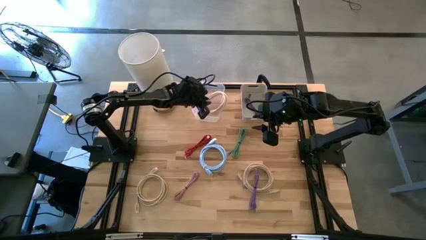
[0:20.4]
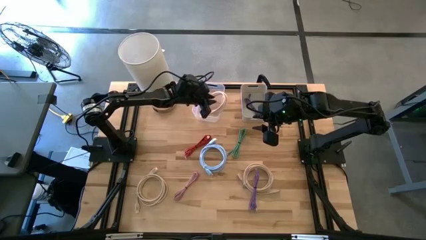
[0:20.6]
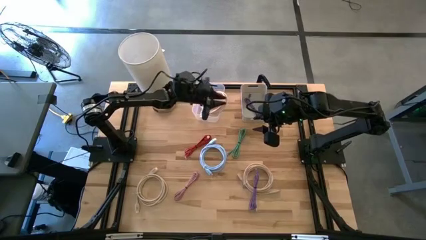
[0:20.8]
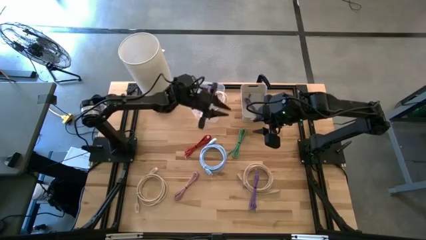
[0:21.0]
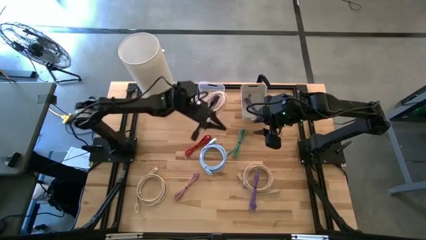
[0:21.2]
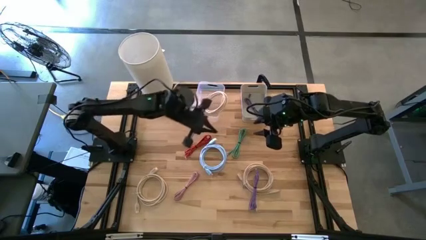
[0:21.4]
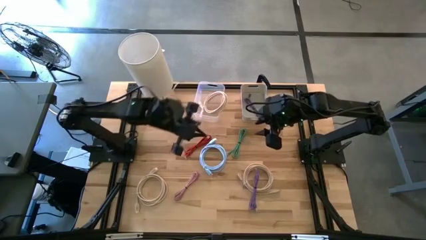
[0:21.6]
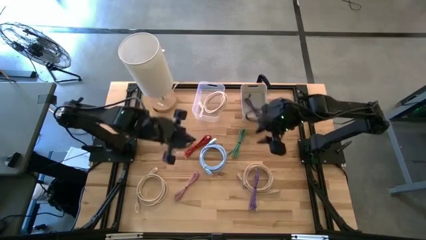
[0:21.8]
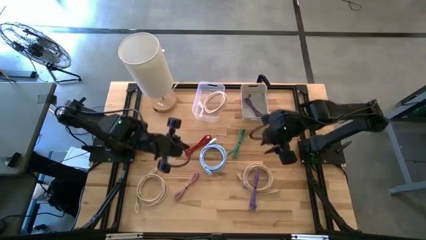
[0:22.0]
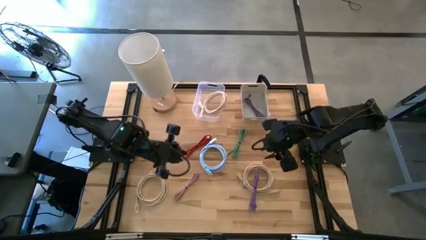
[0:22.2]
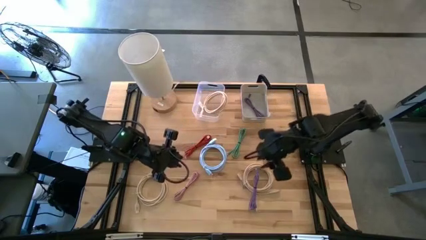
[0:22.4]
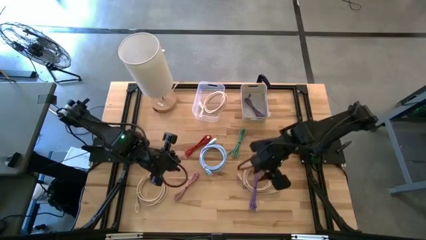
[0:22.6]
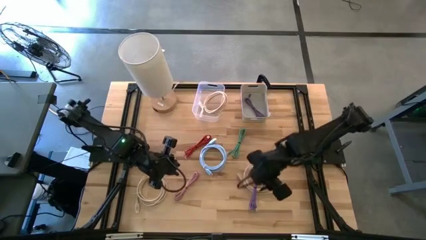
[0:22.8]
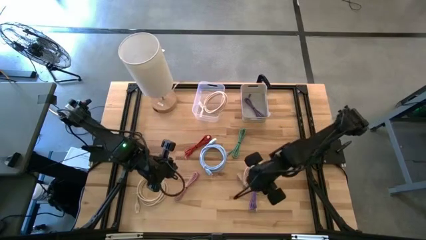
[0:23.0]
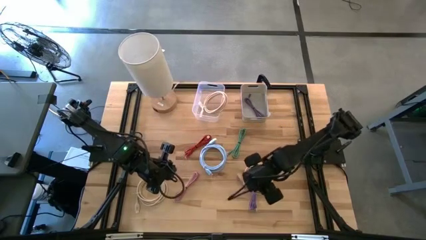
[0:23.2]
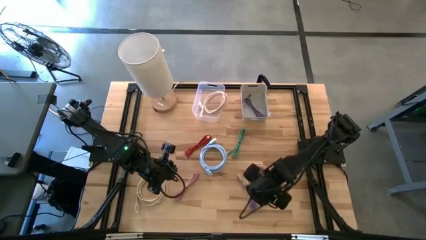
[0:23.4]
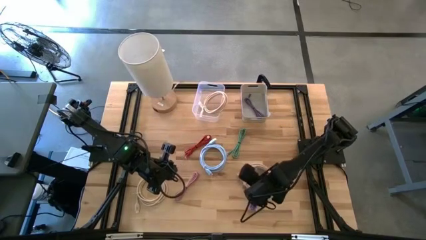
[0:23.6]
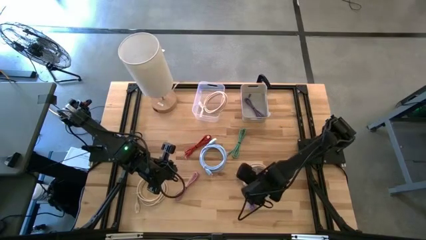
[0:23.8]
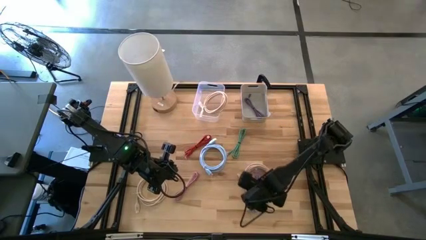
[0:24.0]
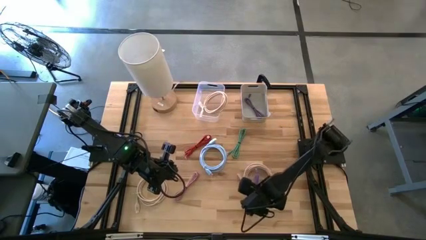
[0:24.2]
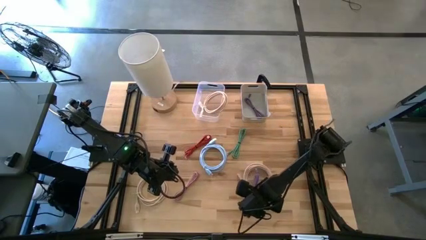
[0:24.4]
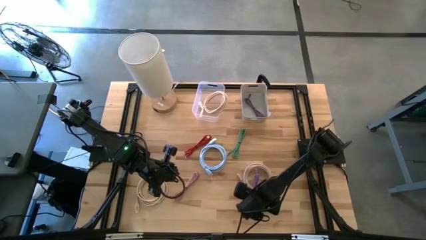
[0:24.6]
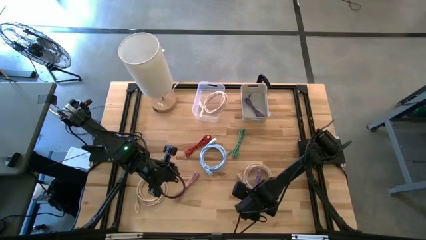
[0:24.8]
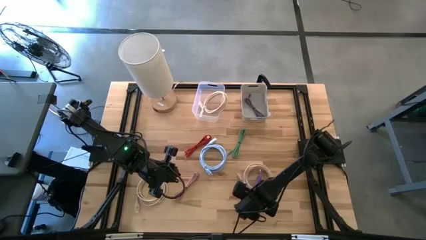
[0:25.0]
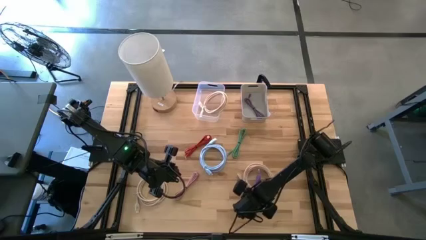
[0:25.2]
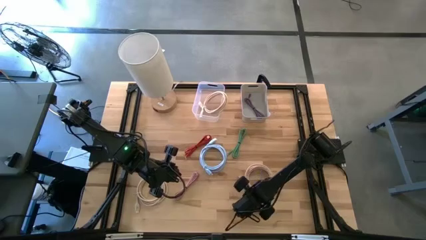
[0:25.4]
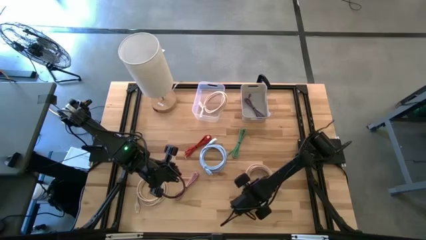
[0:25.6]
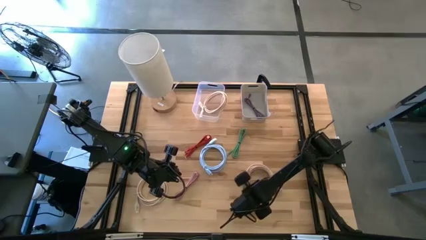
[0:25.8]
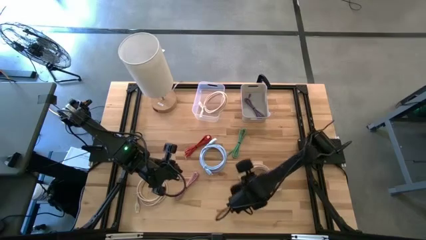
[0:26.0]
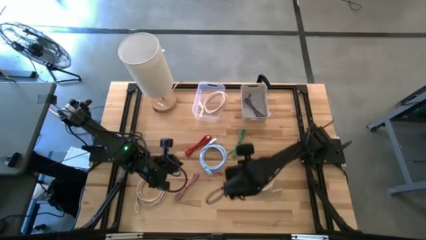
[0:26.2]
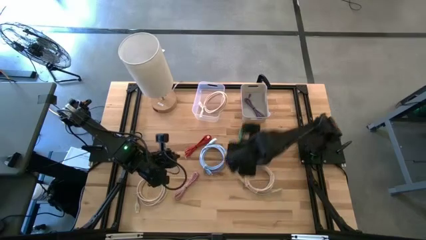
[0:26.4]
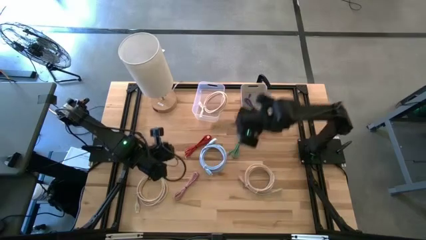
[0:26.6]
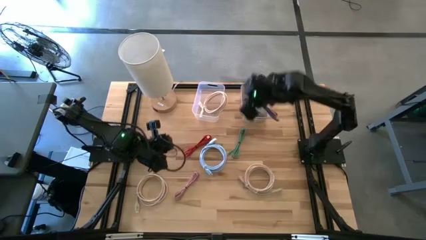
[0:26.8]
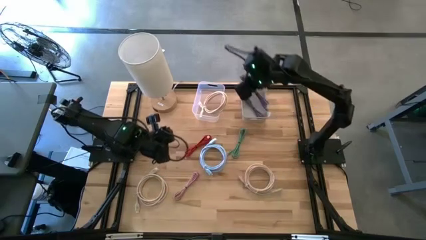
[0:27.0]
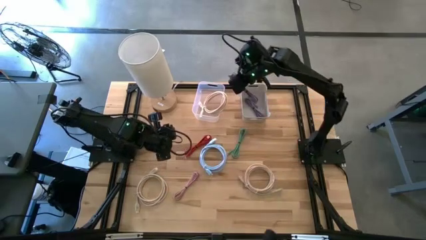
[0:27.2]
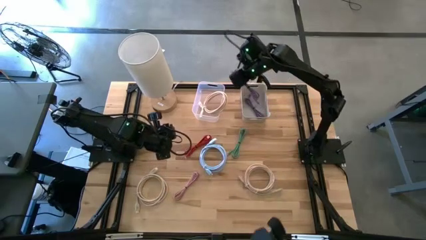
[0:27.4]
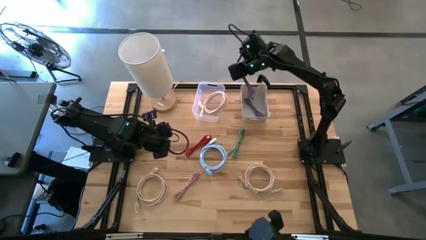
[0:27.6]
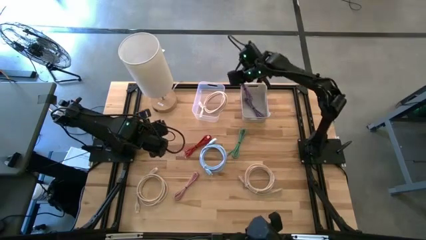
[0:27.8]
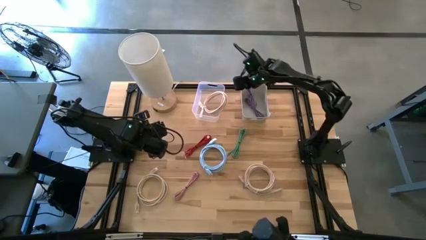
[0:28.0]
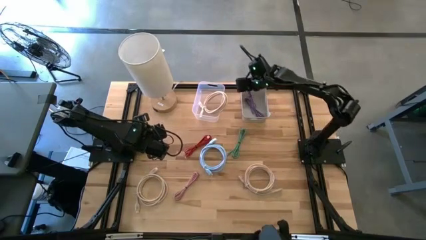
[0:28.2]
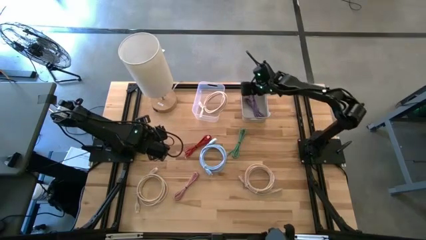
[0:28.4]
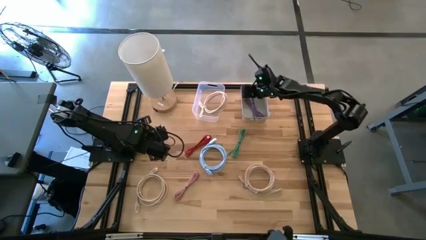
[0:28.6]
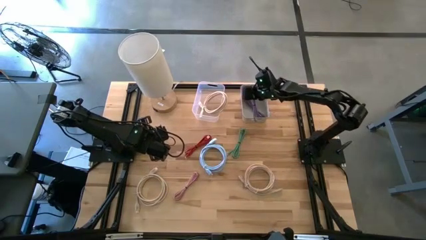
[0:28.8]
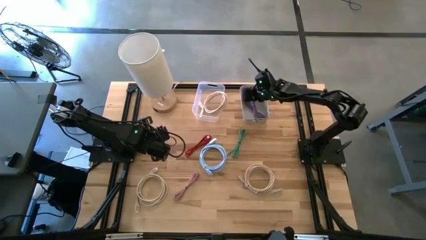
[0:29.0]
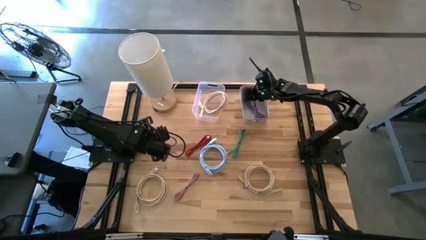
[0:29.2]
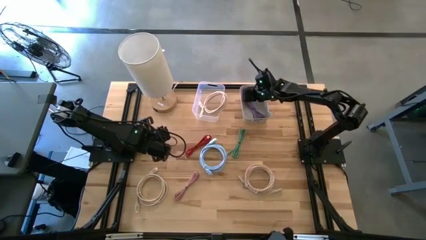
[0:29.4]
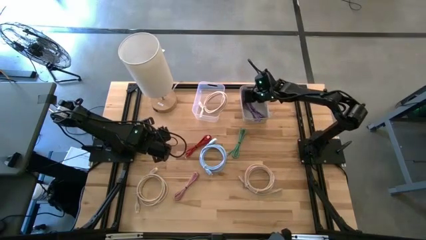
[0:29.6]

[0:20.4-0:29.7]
Task: Pick & Place USB Port
Put the purple charger cable into the gray bin

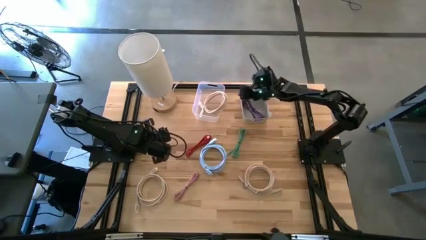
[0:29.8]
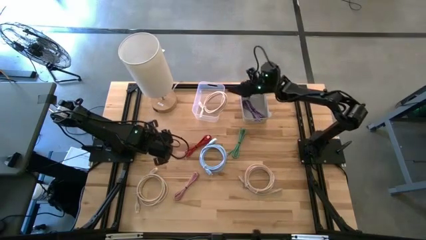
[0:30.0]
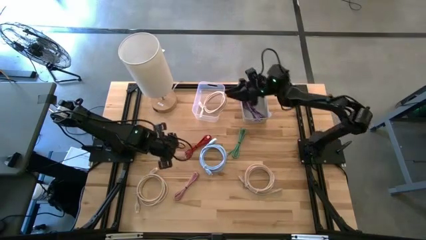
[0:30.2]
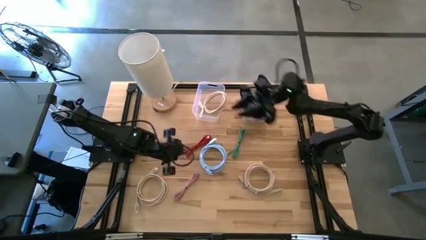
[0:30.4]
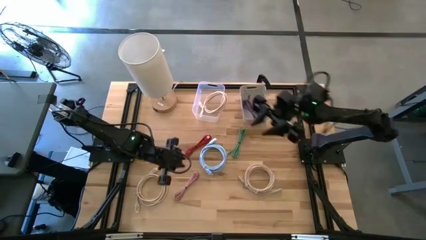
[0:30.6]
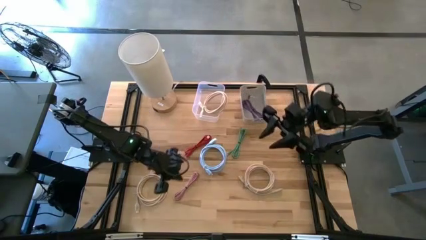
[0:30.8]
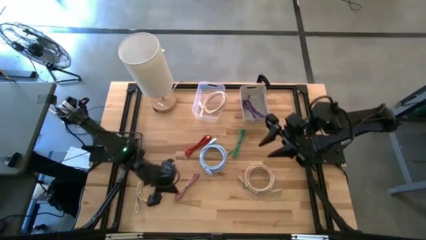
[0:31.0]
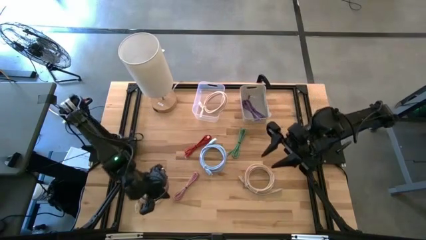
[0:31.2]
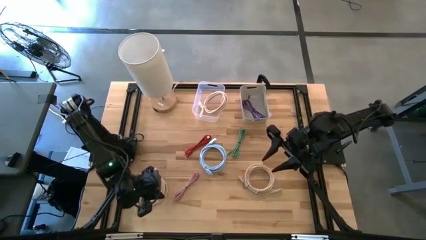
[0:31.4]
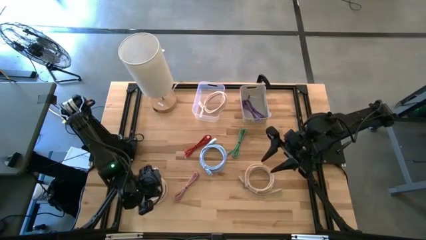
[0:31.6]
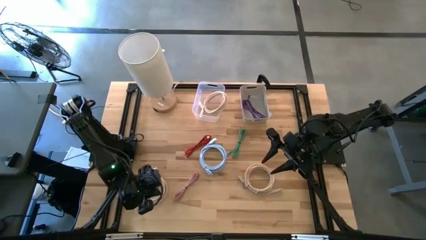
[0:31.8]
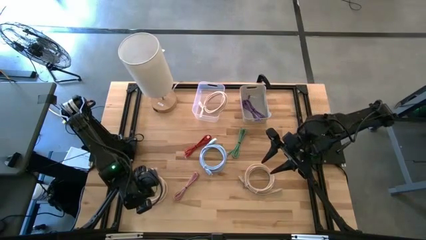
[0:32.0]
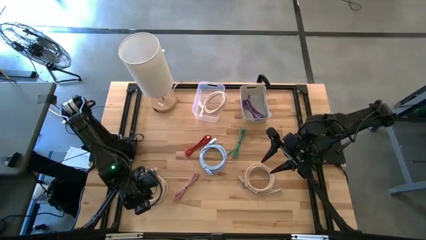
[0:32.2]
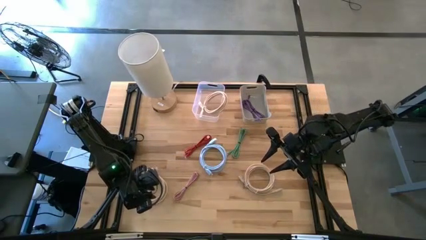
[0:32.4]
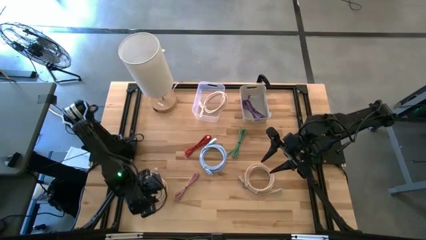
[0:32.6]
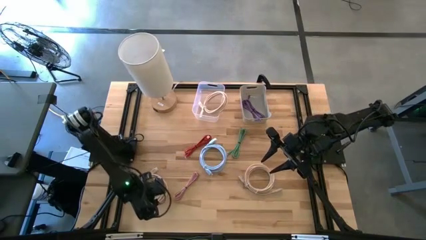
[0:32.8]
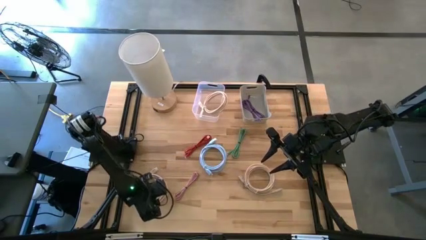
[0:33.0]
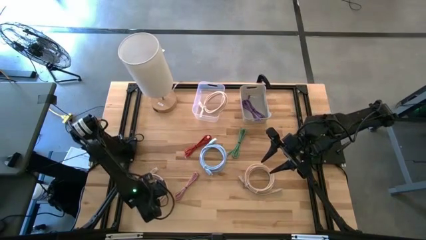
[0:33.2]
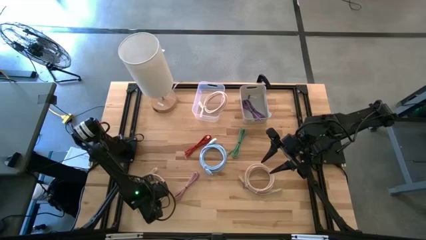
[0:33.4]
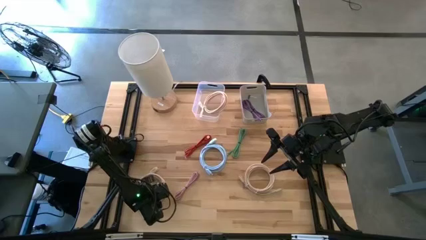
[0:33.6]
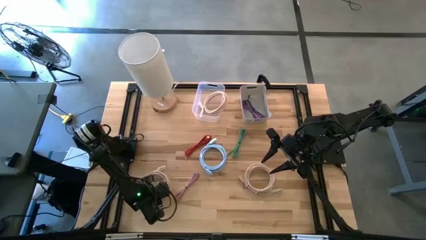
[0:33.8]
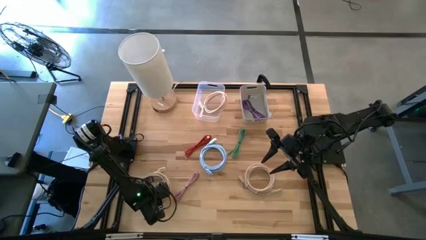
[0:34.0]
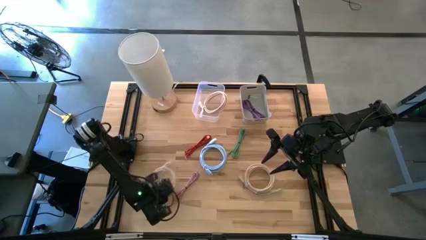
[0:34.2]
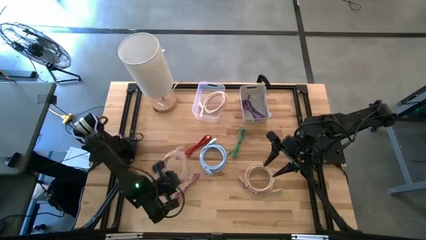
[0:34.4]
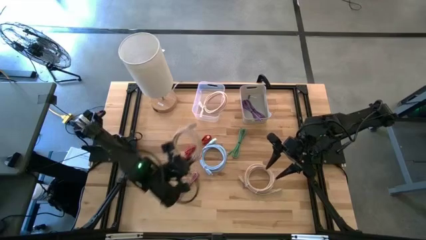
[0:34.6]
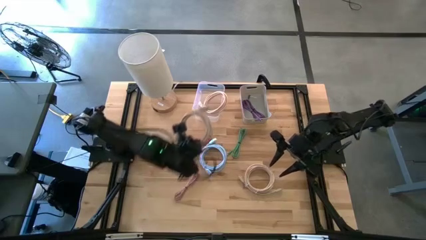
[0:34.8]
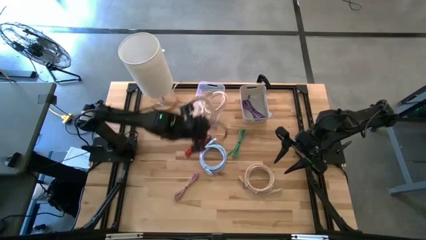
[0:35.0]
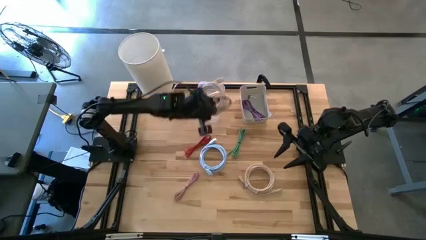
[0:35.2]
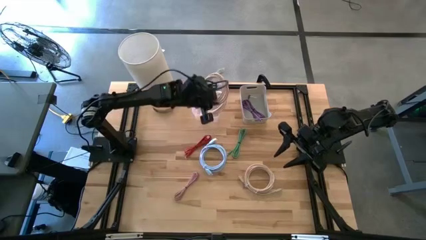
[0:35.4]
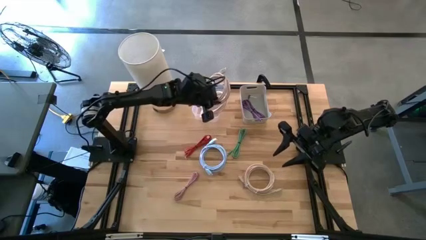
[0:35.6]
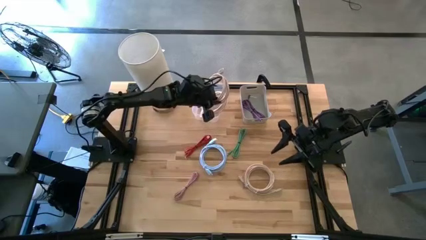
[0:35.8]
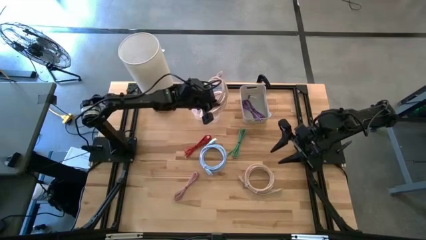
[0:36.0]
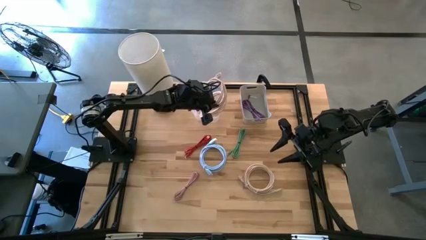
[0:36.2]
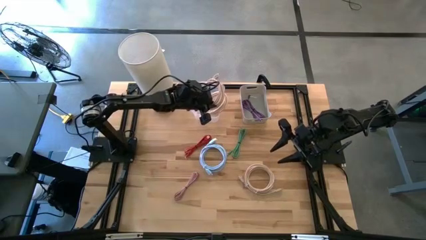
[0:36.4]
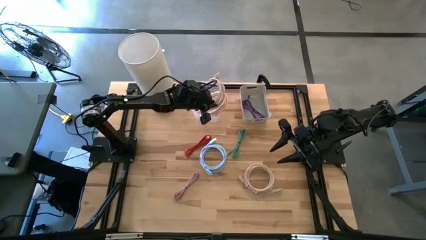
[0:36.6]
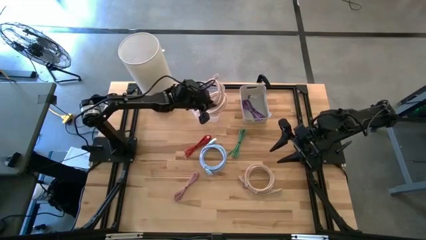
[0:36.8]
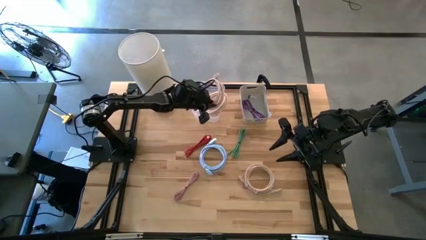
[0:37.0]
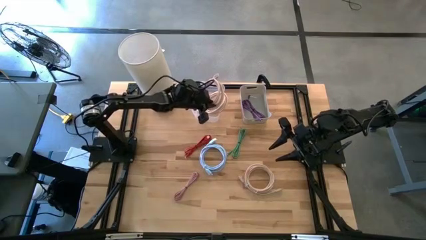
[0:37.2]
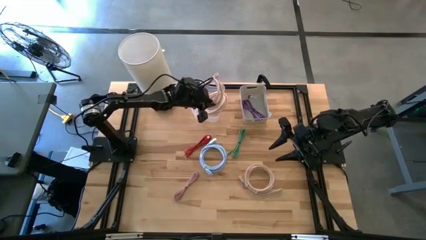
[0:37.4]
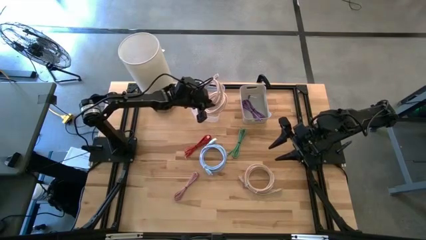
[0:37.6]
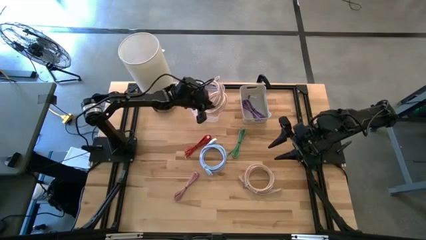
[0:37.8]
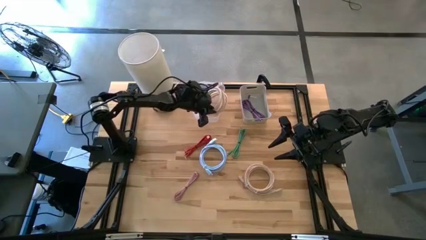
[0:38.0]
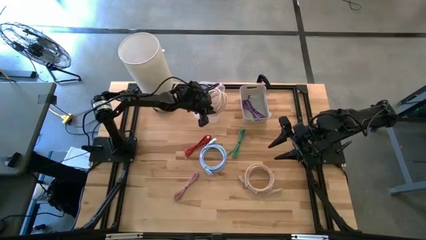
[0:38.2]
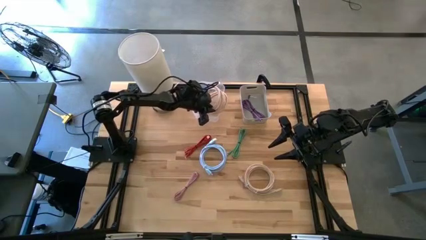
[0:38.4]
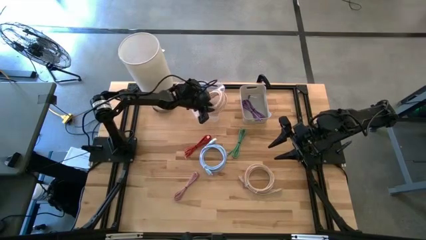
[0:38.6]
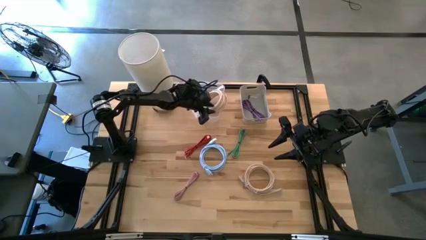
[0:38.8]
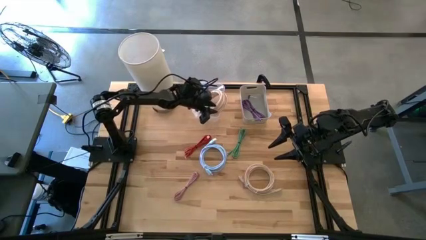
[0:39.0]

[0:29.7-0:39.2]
Put the left light yellow hdmi cable into the transparent bin
